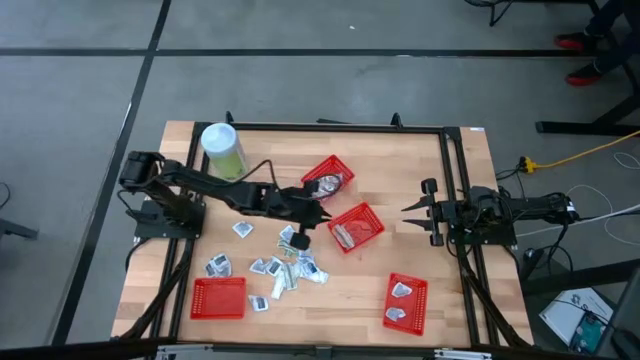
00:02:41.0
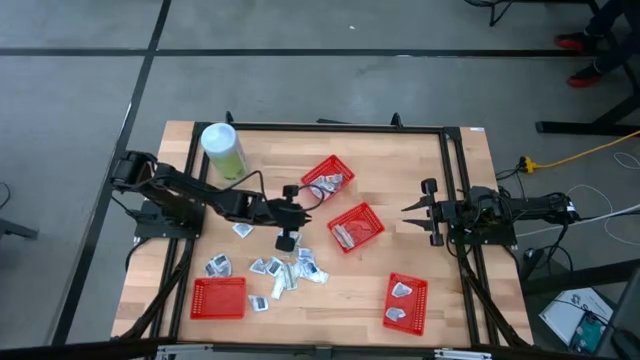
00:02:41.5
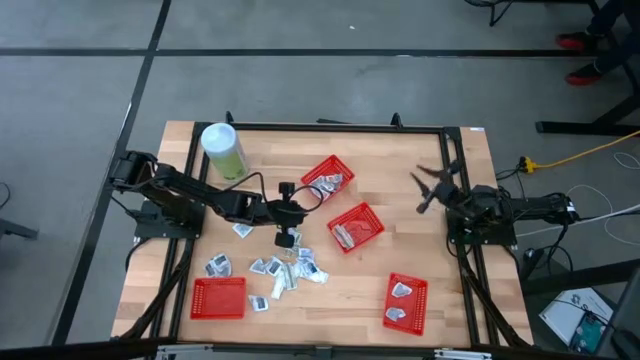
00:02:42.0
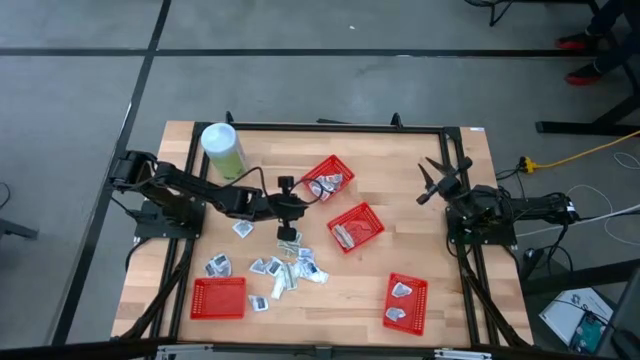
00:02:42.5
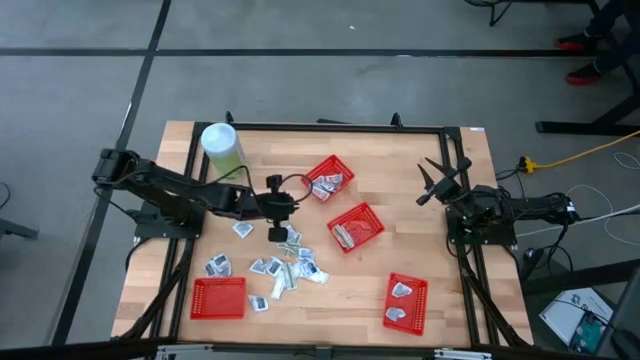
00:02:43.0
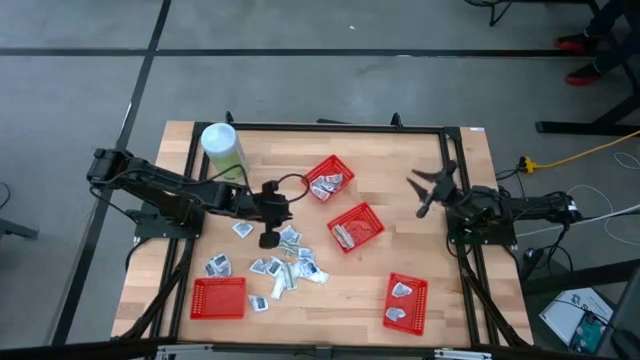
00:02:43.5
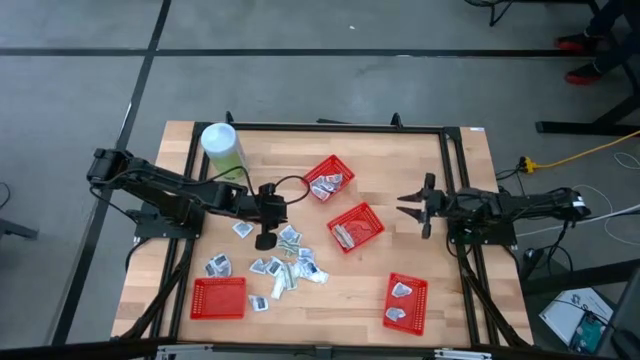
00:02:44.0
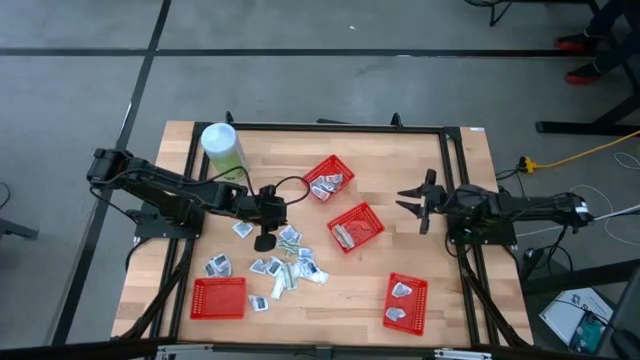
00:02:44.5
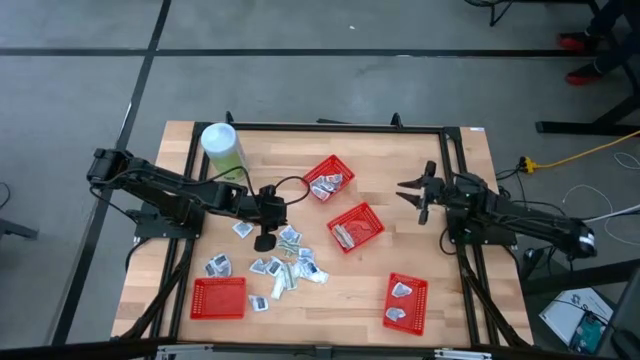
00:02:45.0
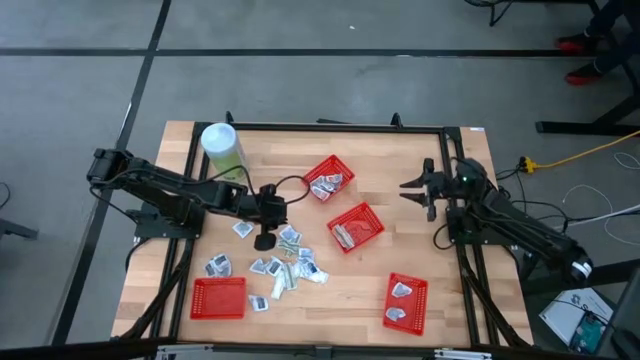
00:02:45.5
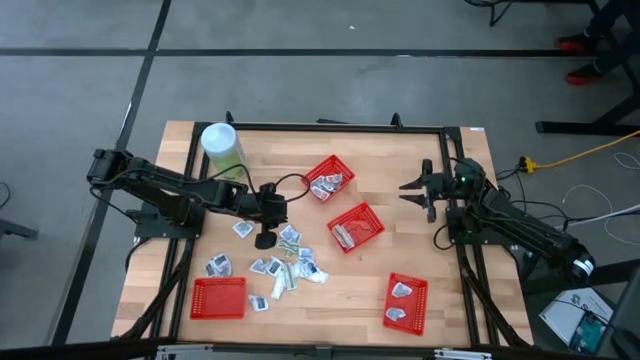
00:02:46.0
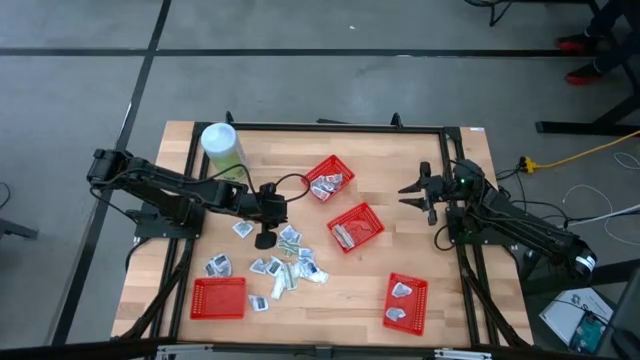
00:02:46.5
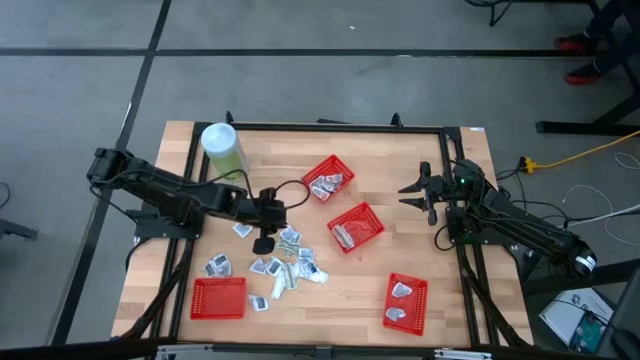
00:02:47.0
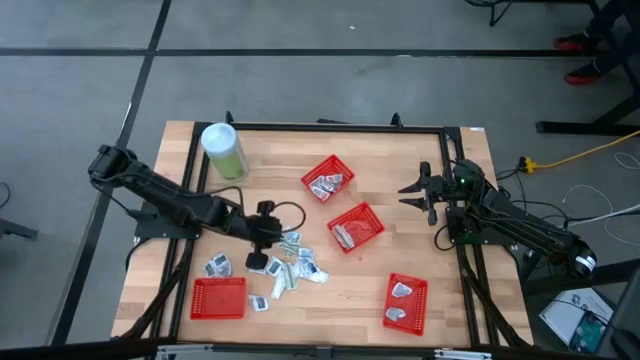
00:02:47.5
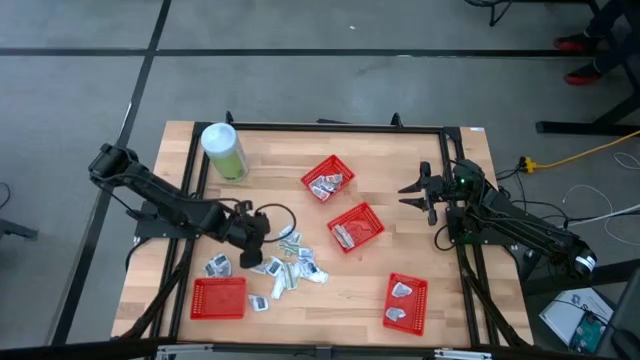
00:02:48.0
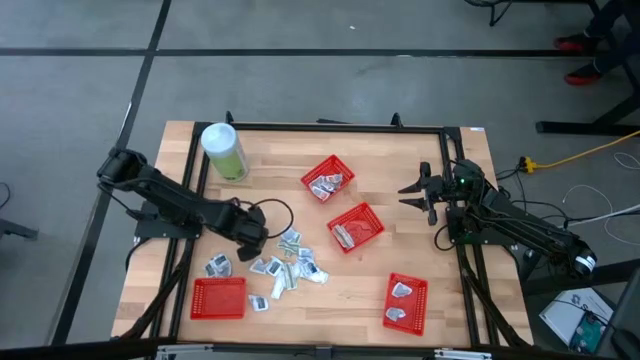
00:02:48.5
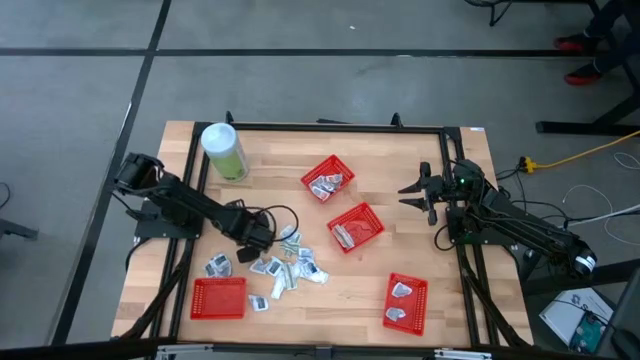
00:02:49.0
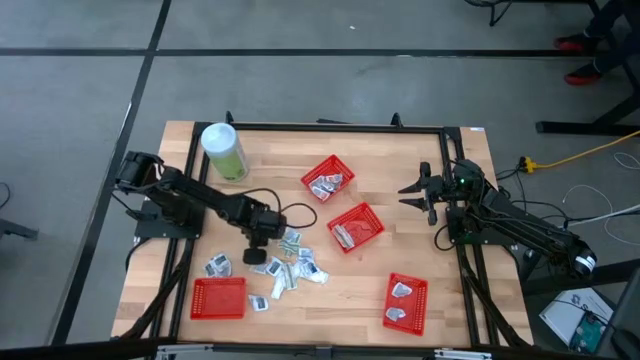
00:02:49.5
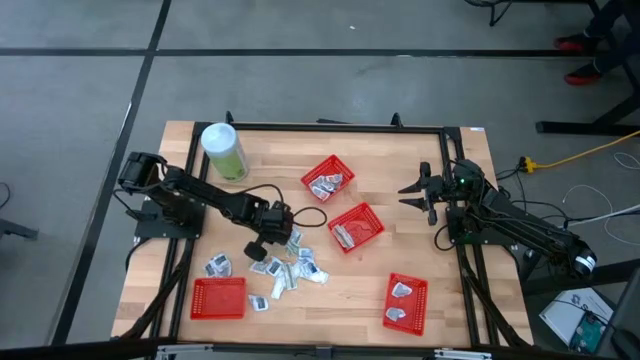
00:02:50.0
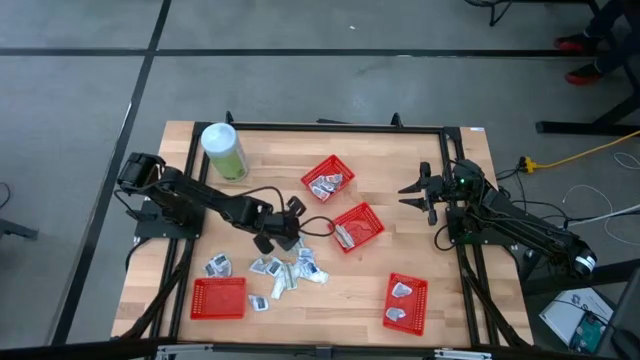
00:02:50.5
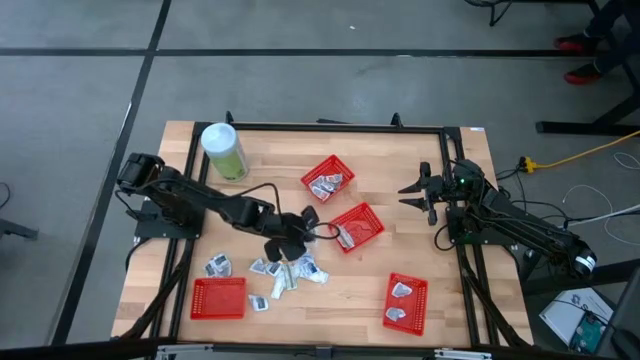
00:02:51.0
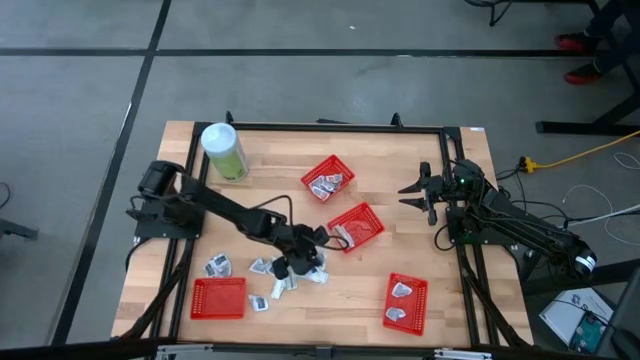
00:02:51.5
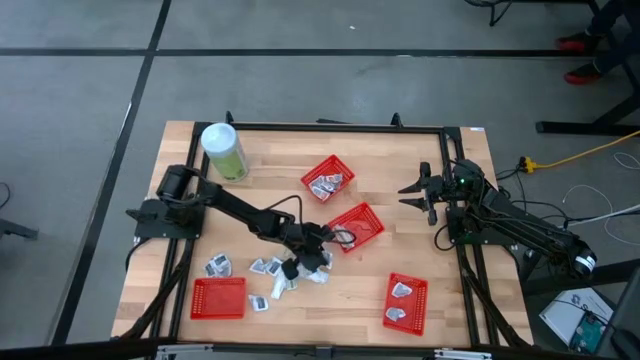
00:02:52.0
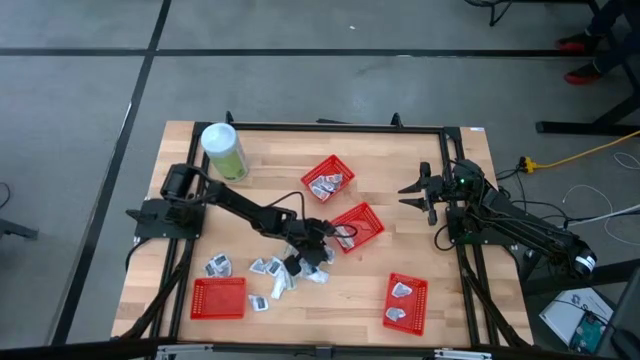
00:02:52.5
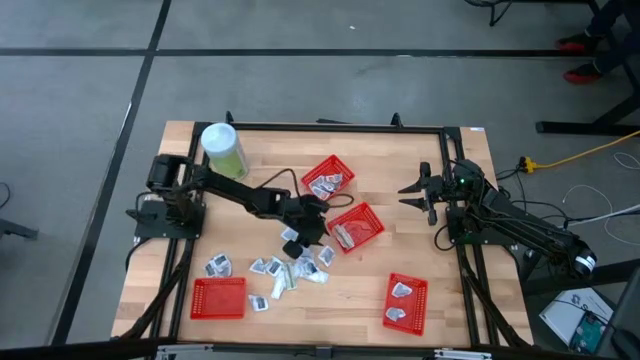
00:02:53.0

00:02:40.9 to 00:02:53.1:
Task: Pick & Place First Aid Supplies
Put the gray towelette pad into the red container

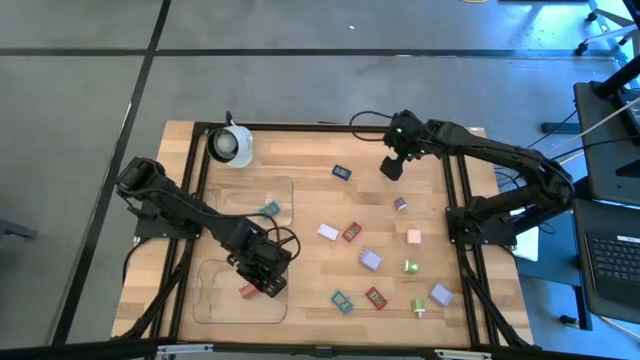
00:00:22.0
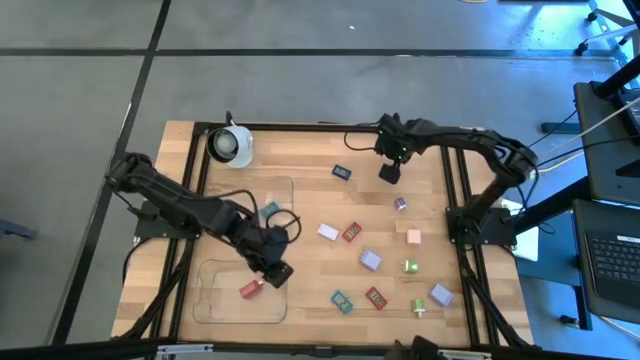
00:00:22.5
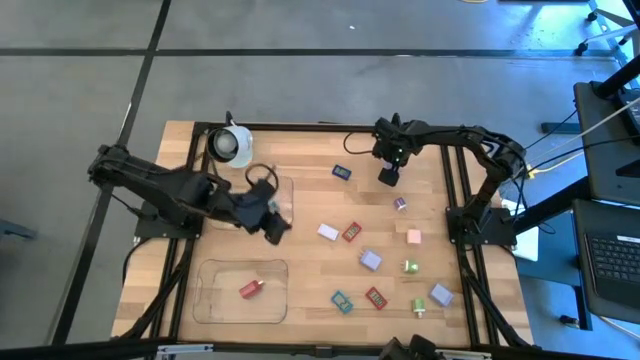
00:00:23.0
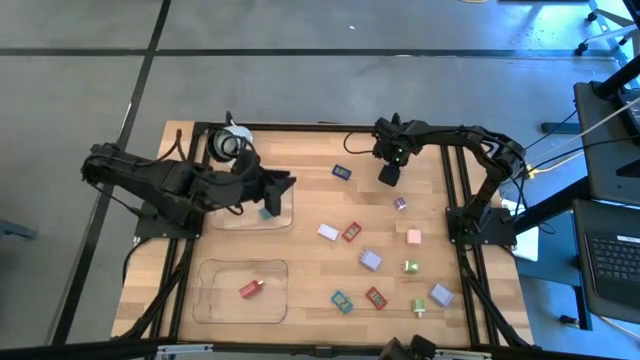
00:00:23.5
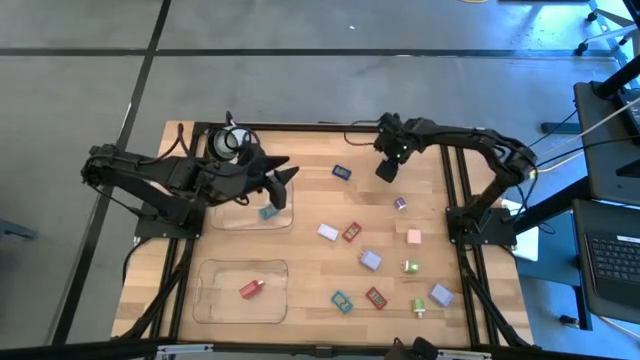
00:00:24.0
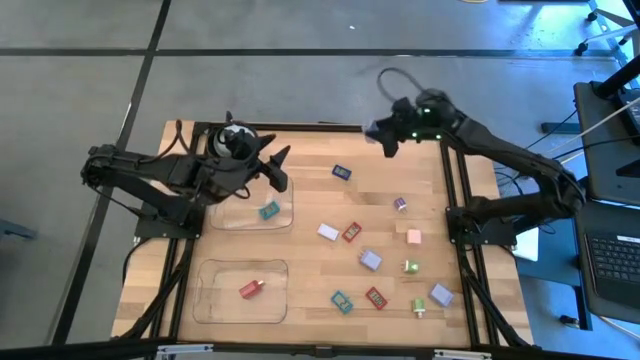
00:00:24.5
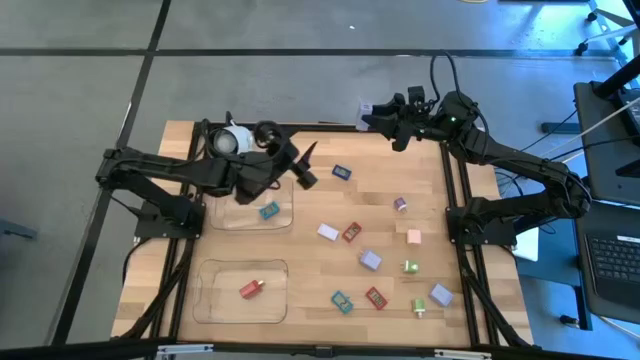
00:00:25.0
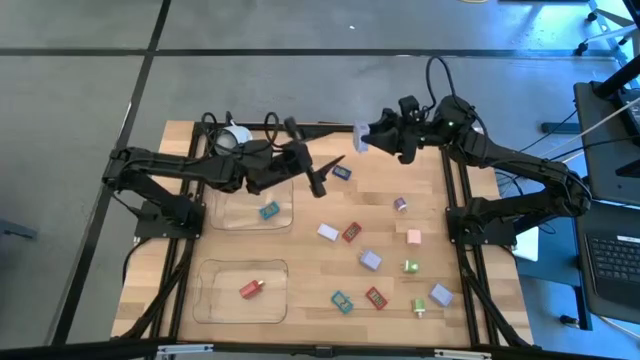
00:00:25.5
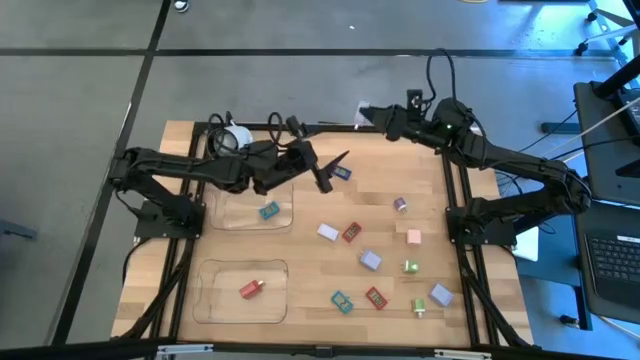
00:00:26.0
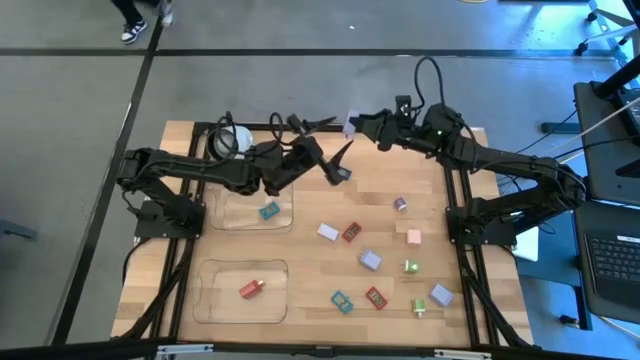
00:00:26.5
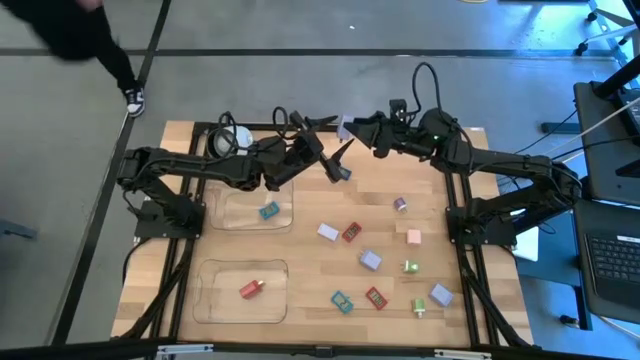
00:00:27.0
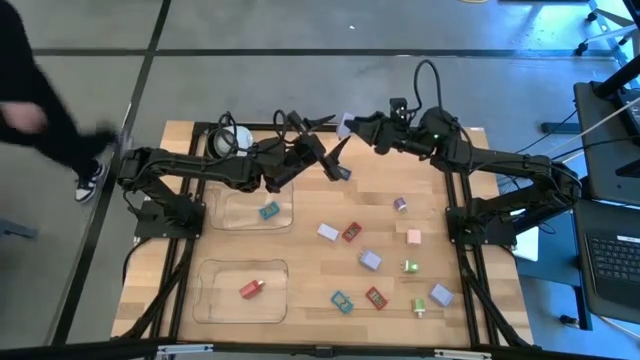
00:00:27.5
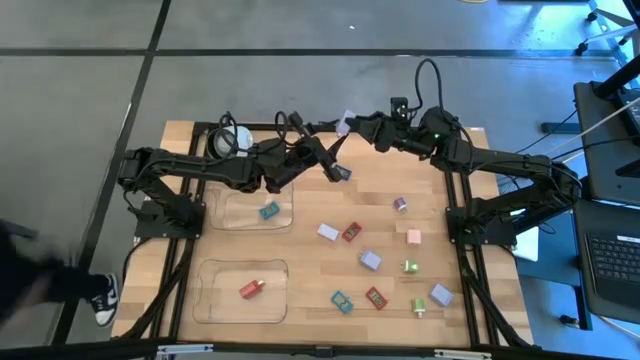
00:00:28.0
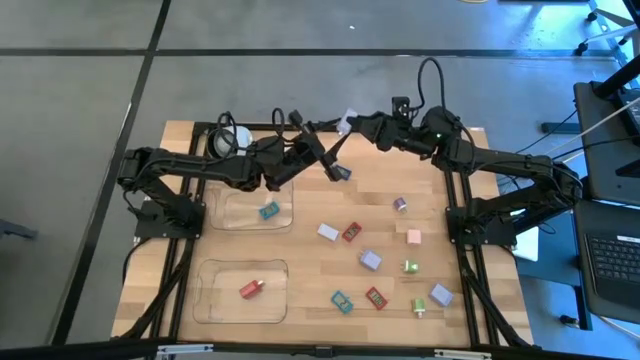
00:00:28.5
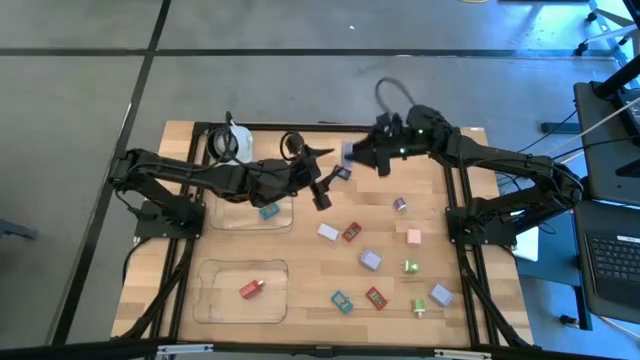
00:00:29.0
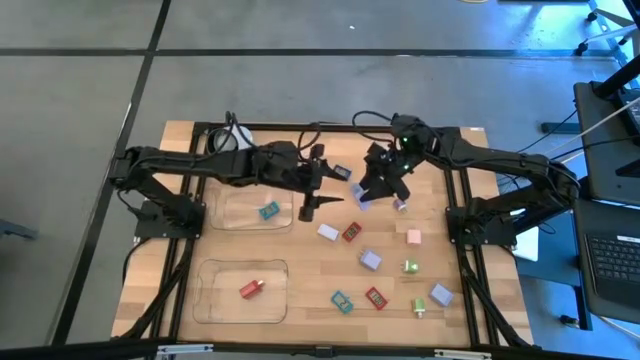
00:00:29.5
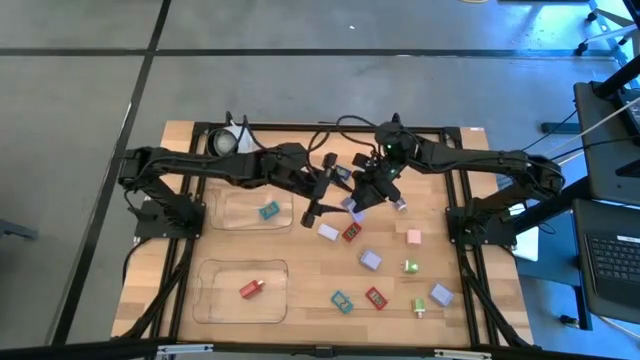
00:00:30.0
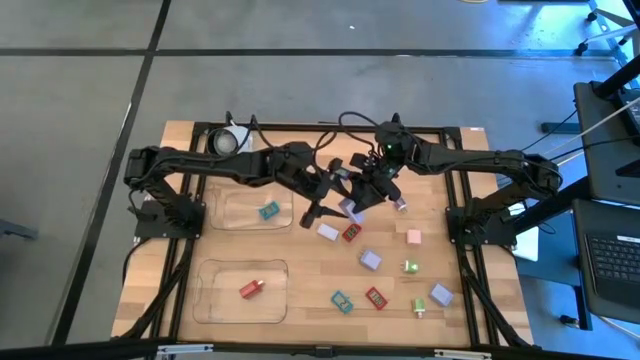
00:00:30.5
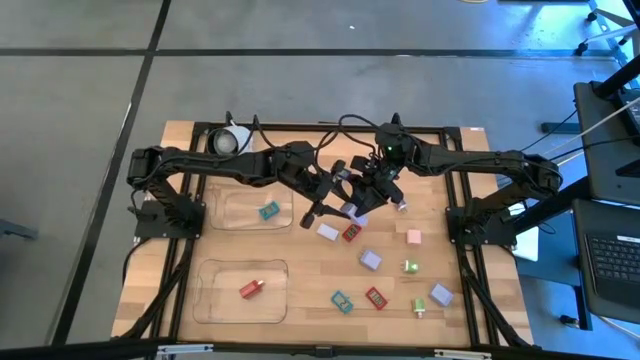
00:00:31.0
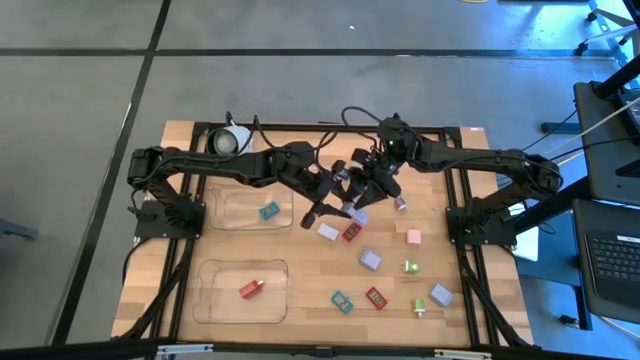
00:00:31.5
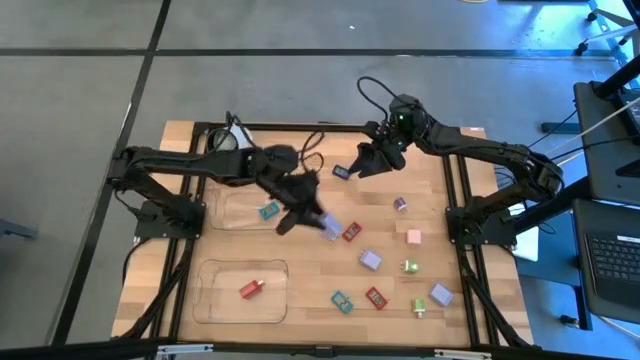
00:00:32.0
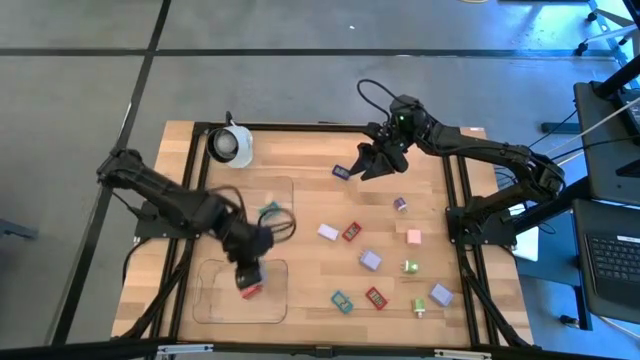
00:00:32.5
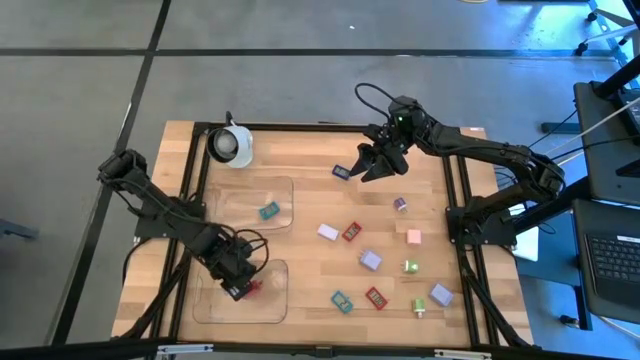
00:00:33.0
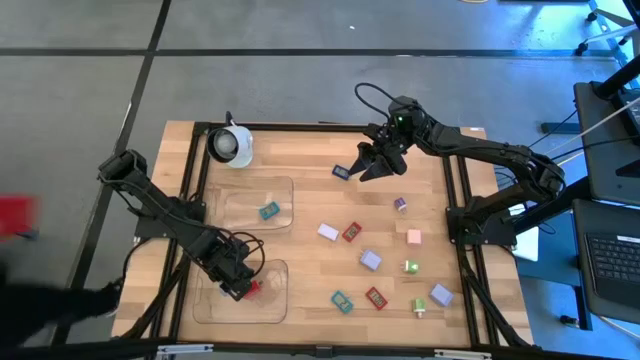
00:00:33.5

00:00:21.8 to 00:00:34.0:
Task: Pick & Place Office items
Put the top light blue charger adapter into the bottom transparent bin
